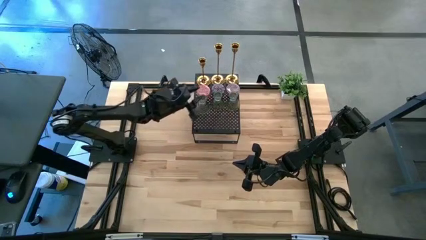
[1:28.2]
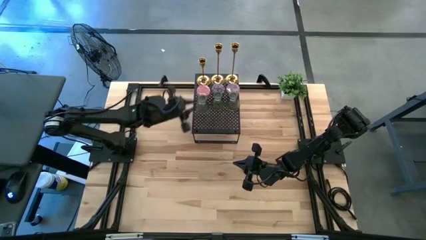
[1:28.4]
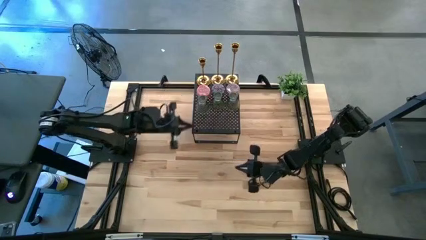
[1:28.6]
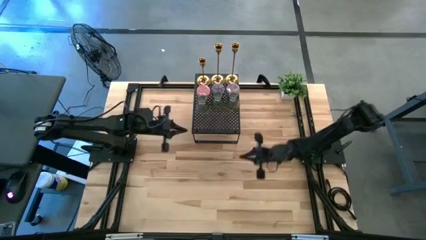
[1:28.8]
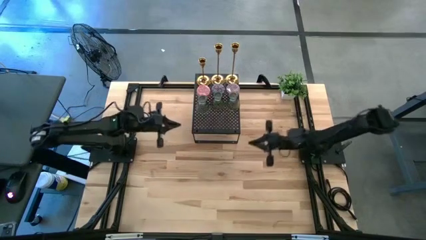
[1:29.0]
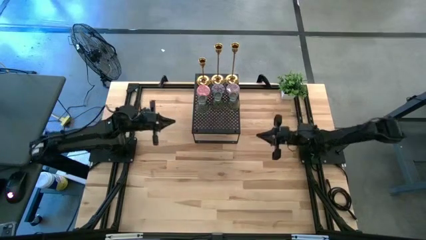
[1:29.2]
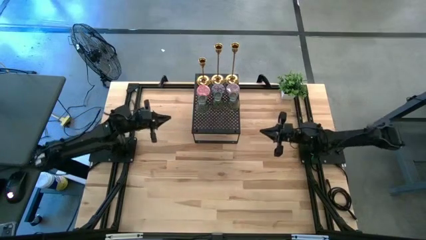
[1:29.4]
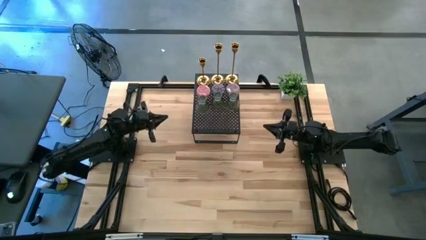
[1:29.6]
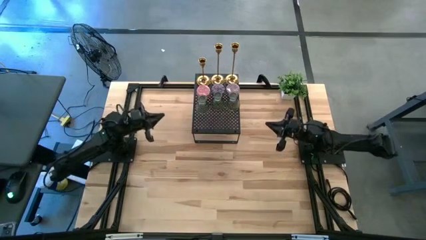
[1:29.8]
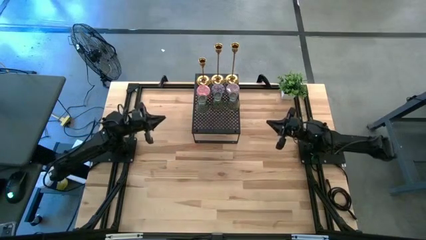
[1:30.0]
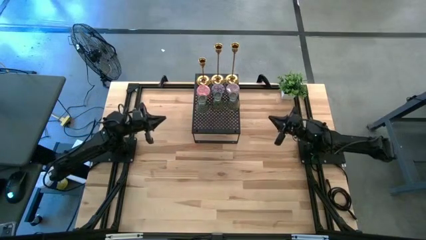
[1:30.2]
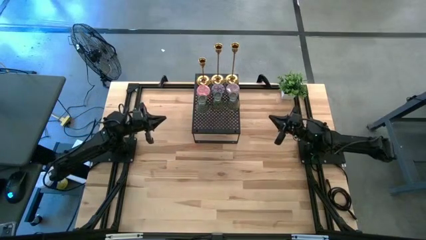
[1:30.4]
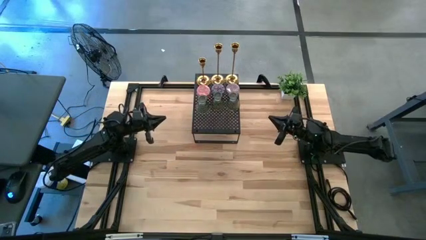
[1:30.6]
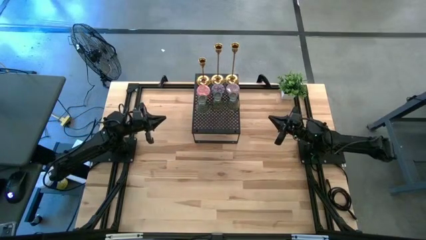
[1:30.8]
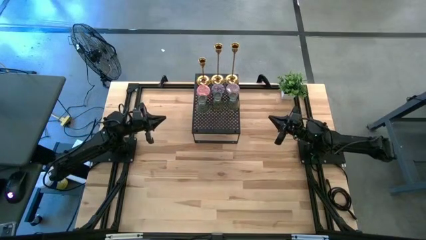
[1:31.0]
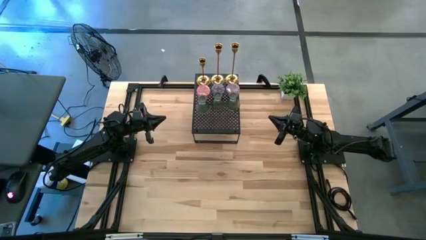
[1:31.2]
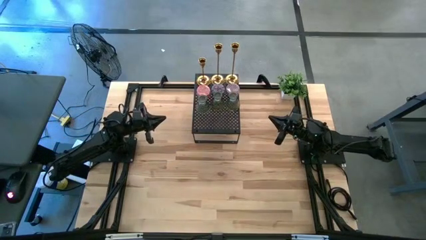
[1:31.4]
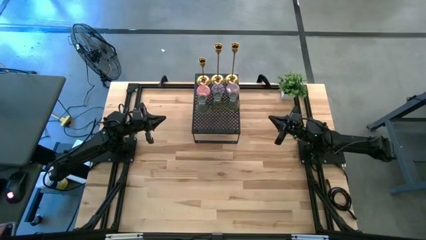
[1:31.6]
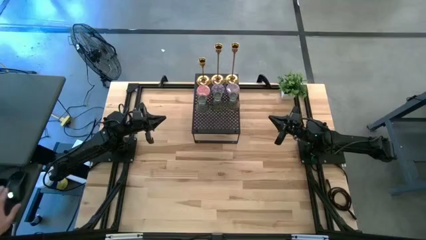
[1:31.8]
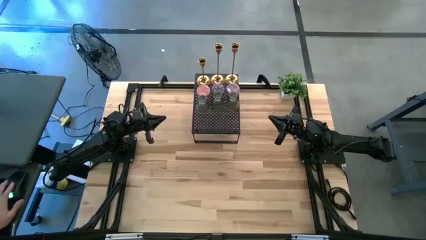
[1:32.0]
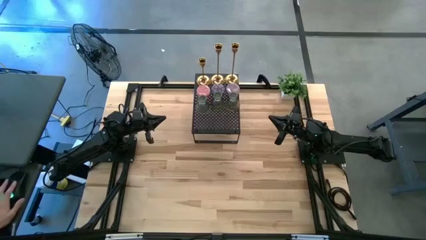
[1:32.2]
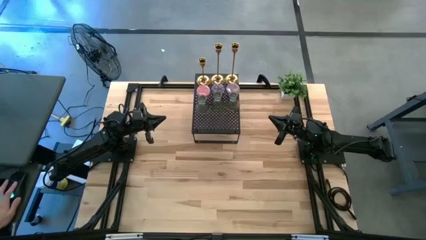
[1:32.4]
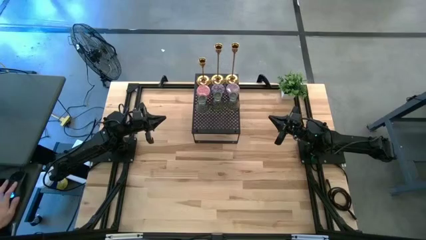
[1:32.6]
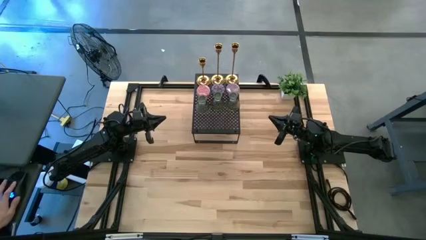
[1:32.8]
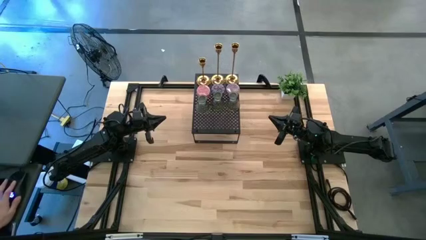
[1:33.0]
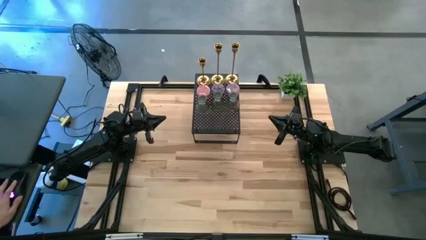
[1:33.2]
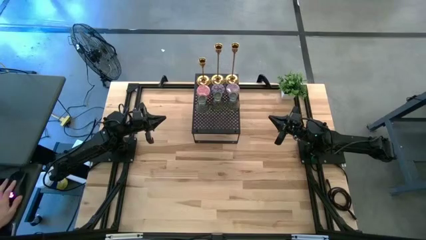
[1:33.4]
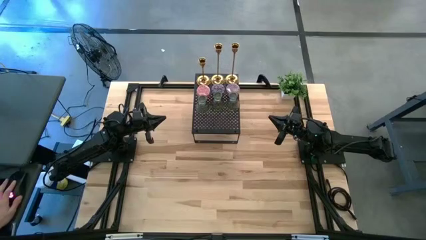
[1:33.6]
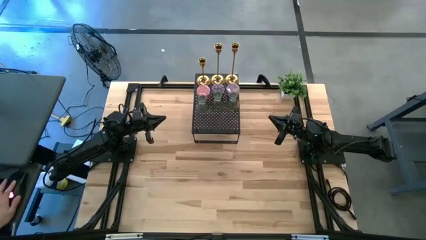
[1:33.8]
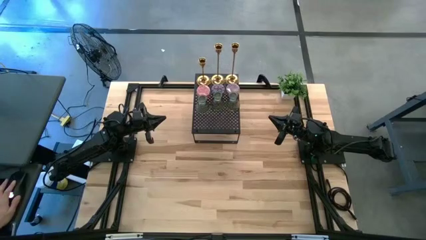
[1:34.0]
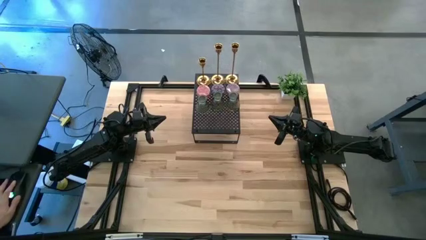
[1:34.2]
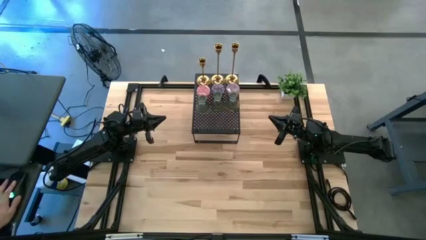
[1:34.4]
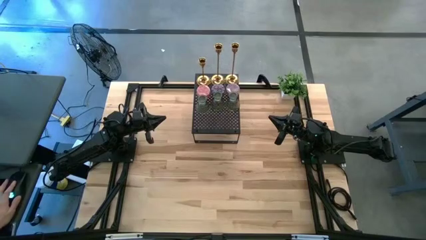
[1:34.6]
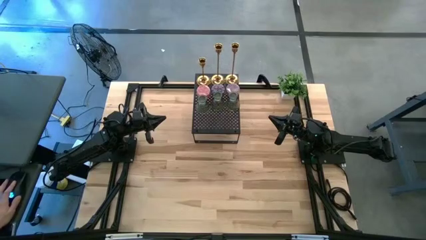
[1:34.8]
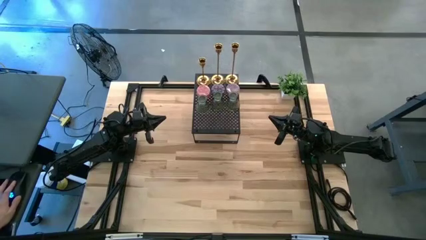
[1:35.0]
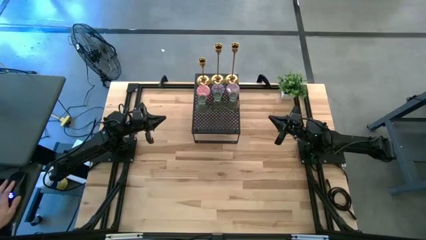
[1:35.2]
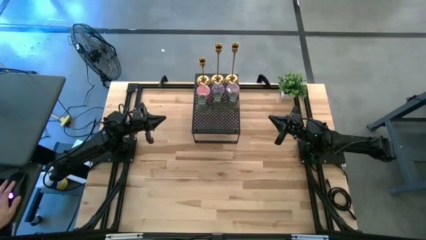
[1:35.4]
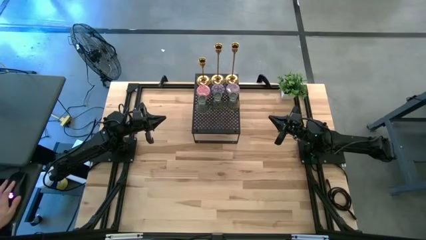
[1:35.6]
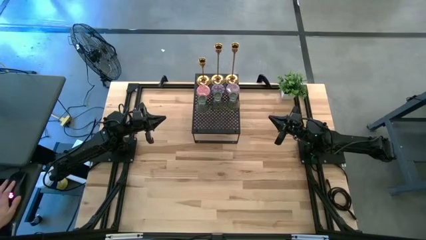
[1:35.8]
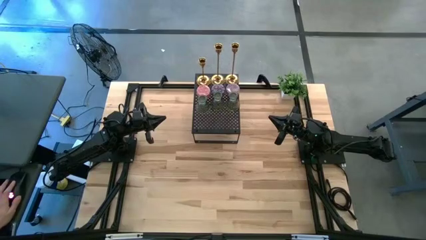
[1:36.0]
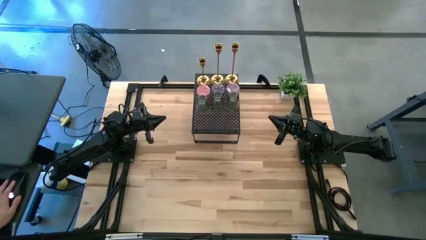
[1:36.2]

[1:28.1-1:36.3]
Task: Pick & Place candle stick holders
Return to Home Position

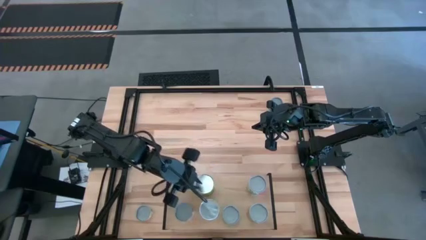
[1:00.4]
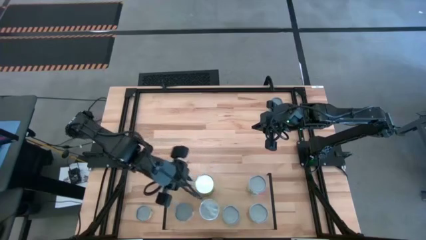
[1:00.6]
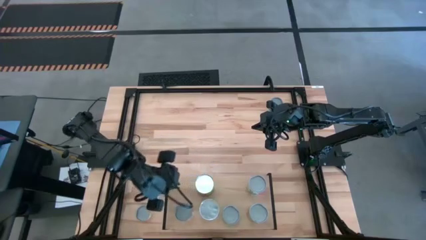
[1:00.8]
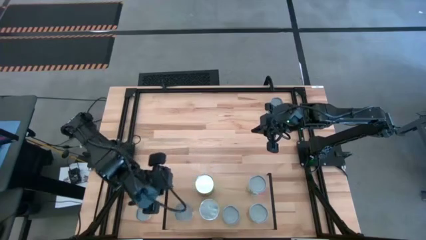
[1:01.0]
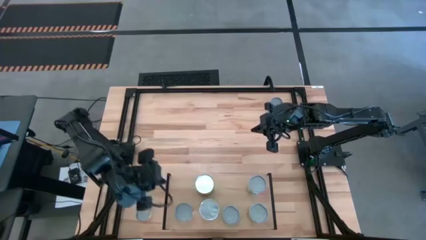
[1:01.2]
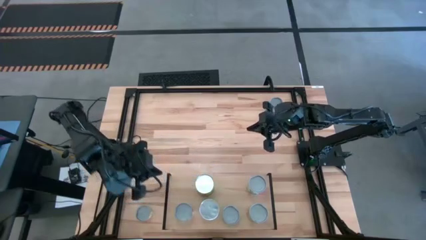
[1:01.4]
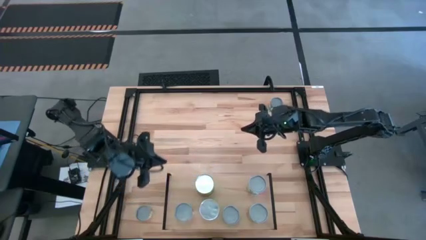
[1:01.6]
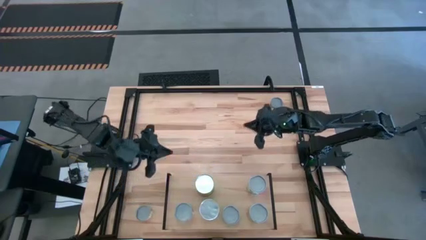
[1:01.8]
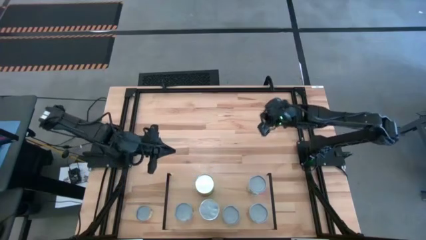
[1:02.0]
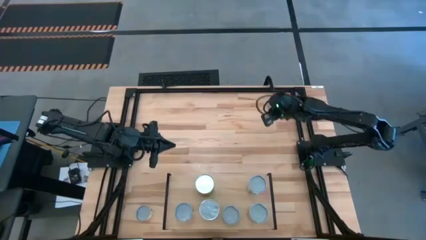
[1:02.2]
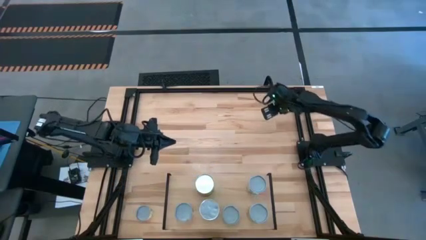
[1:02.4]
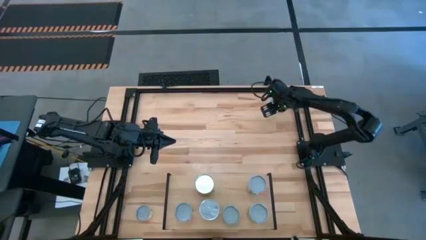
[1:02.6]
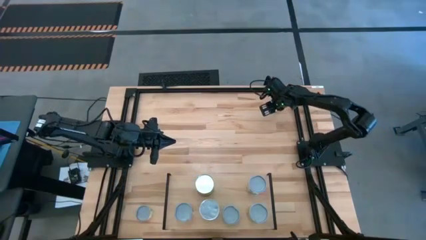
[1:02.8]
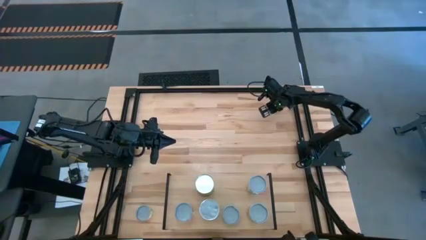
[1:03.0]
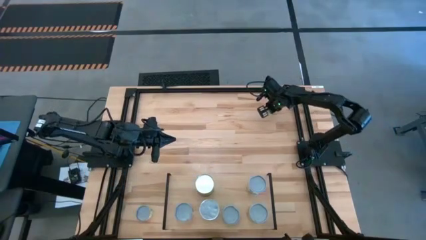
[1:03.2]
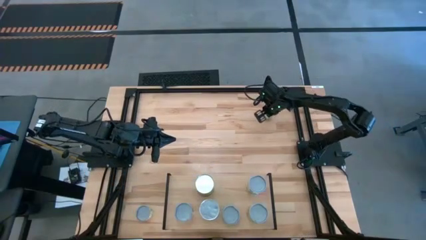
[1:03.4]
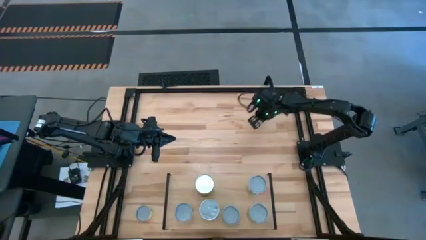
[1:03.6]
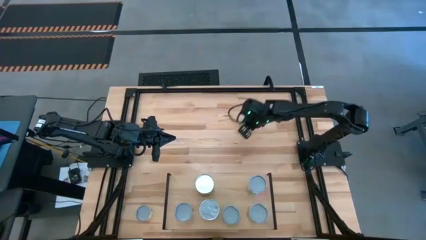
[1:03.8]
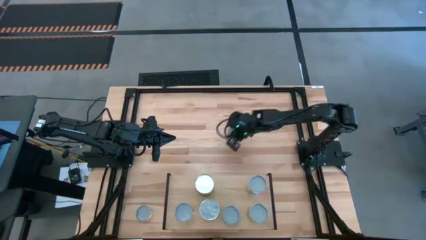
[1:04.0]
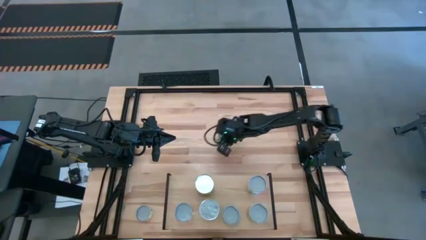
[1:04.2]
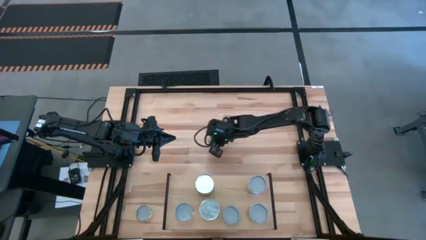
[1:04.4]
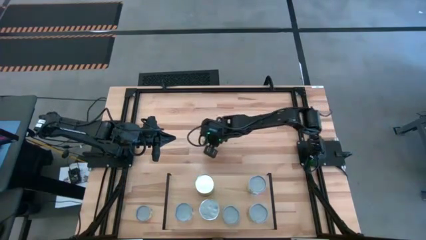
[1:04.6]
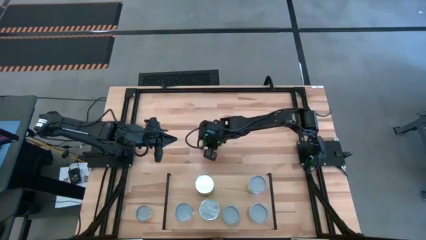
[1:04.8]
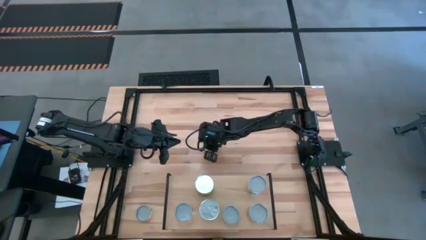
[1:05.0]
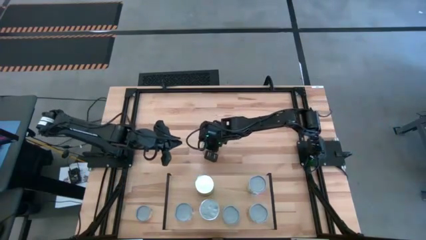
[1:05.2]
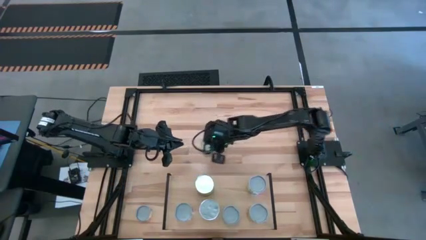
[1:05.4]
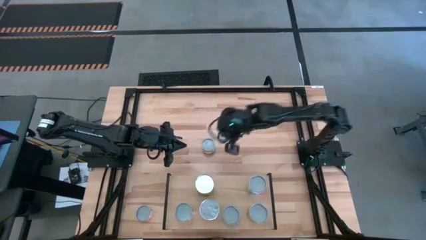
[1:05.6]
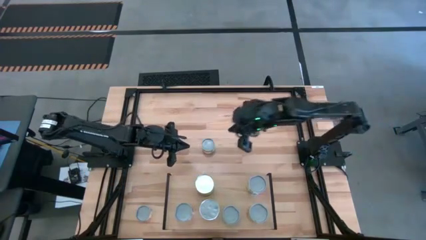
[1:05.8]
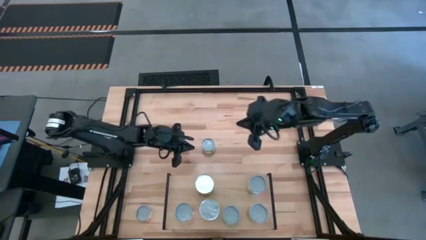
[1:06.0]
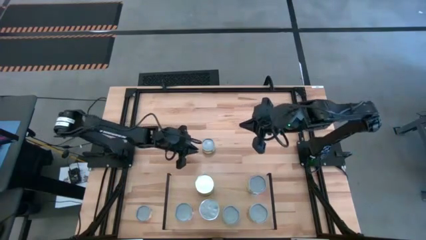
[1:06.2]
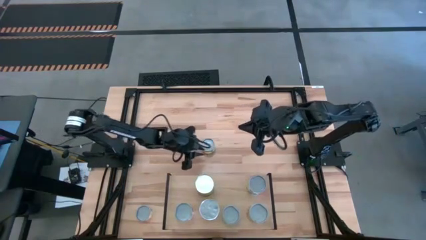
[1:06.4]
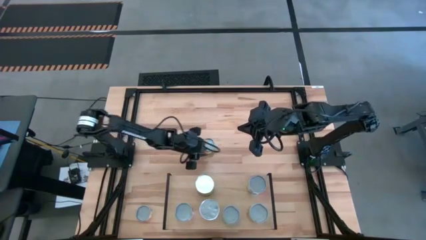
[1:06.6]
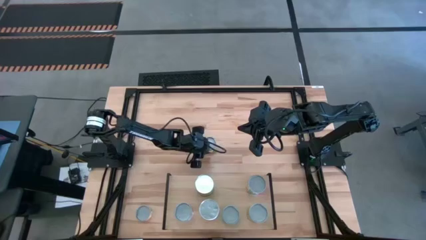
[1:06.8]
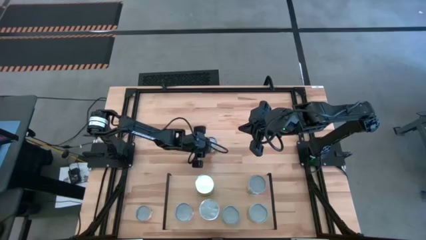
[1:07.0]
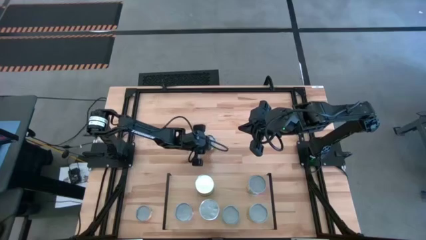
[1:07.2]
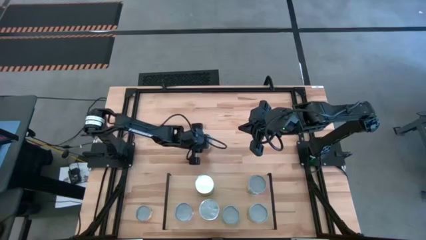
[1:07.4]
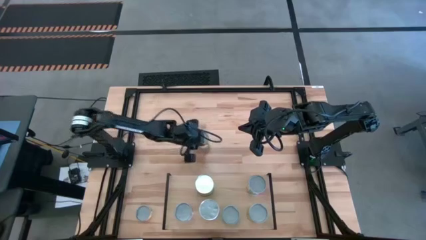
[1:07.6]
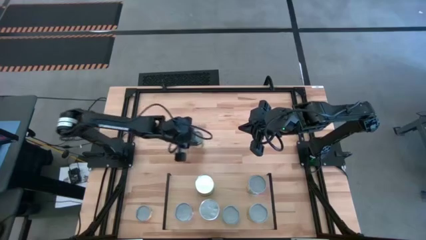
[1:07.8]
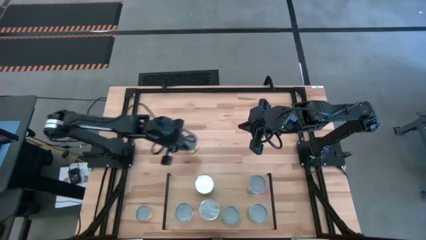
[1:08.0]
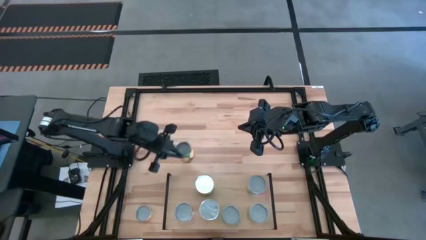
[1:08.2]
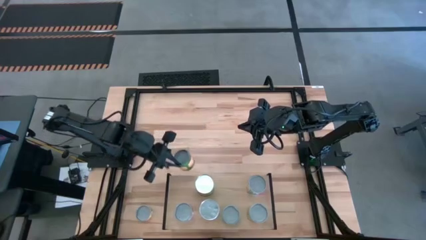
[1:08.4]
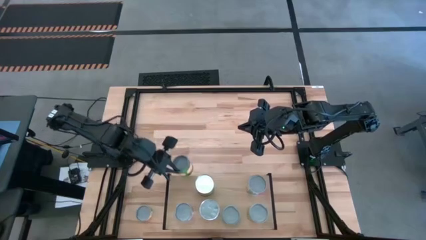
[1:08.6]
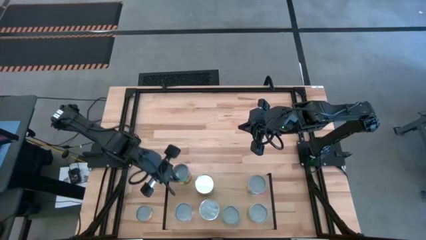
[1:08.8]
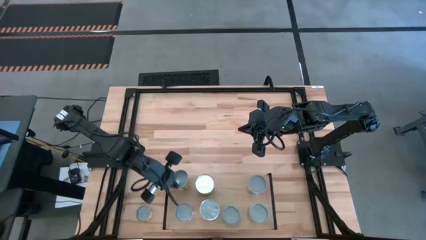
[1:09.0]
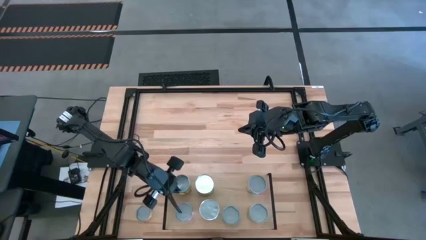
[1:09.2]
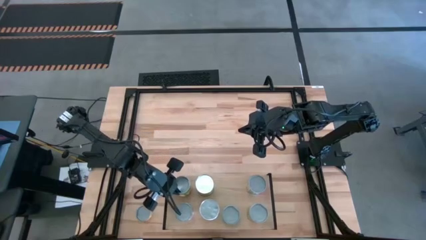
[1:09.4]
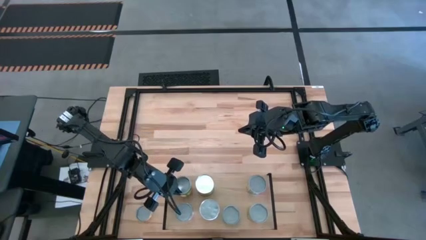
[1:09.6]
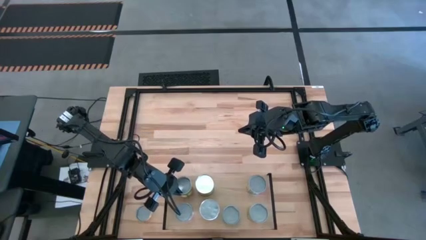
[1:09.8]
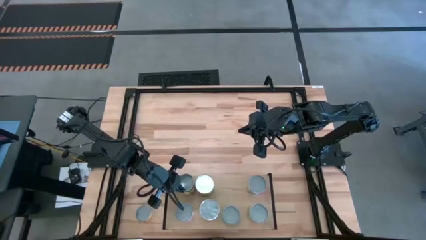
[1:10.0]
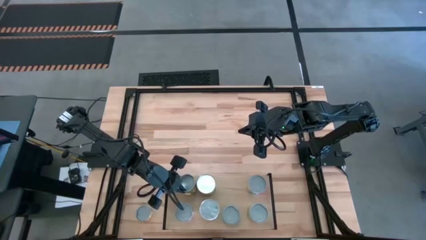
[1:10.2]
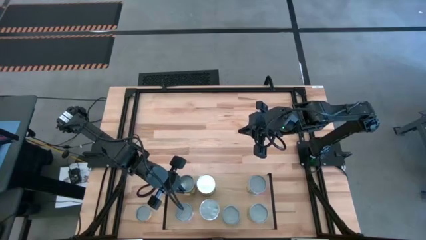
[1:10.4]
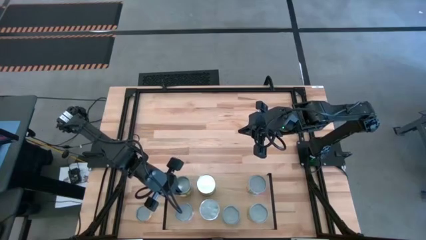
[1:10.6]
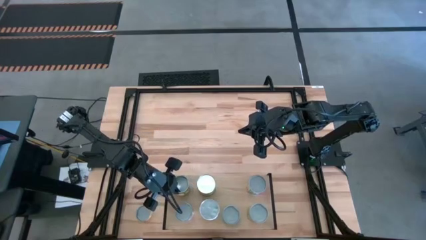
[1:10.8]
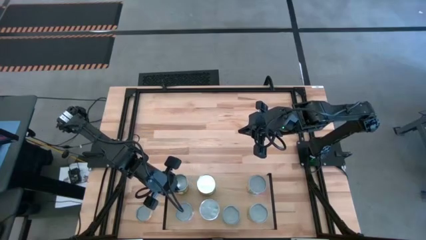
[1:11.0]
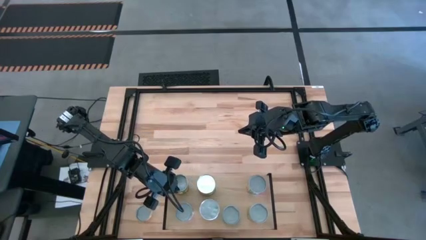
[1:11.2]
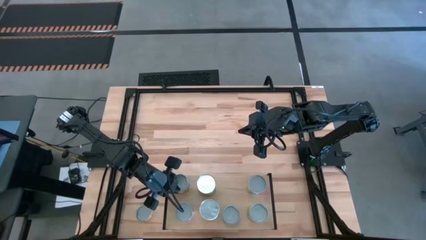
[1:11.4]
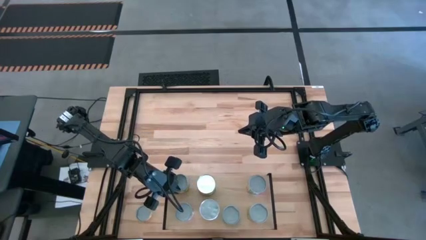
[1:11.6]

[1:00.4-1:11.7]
Task: Pick and place cans onto a shelf
Put the canned peaches on the shelf
